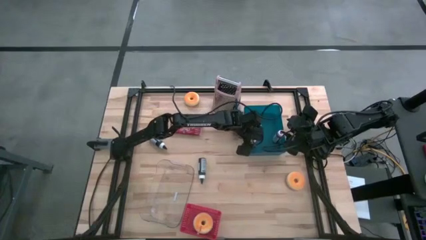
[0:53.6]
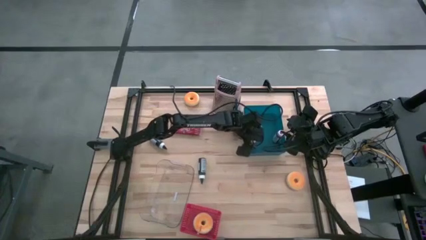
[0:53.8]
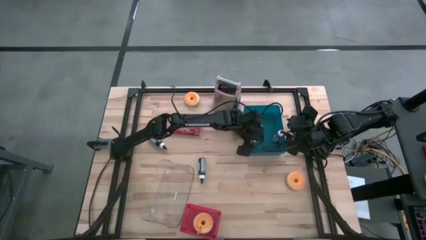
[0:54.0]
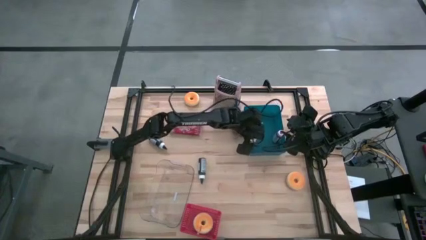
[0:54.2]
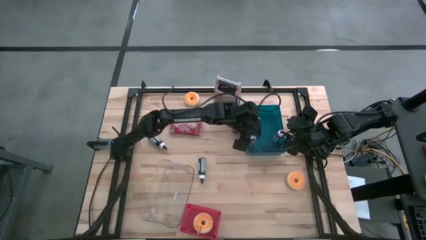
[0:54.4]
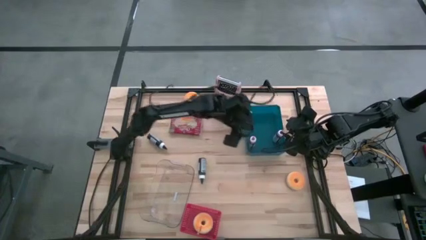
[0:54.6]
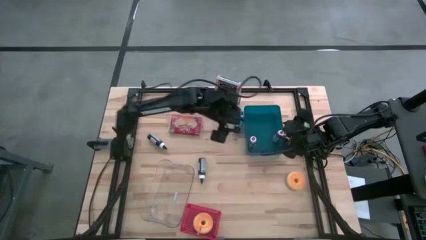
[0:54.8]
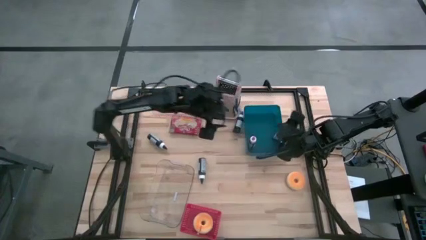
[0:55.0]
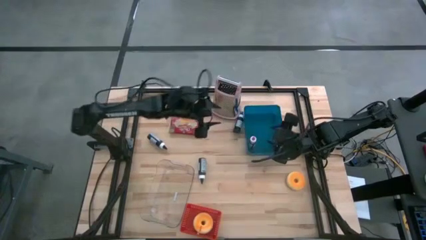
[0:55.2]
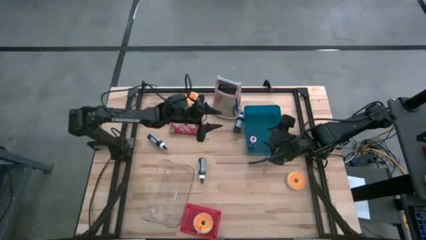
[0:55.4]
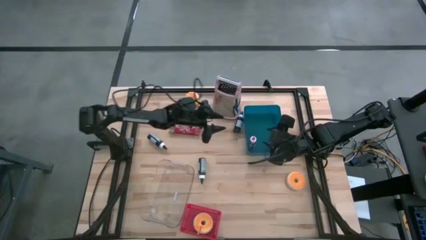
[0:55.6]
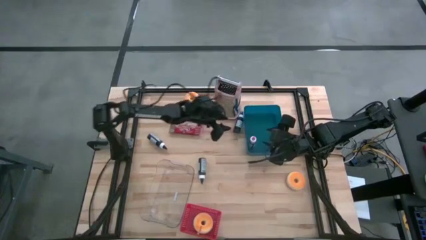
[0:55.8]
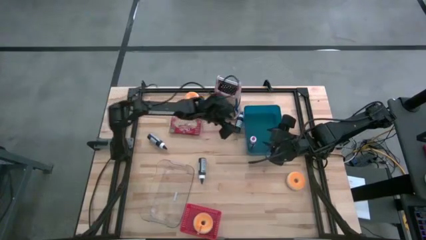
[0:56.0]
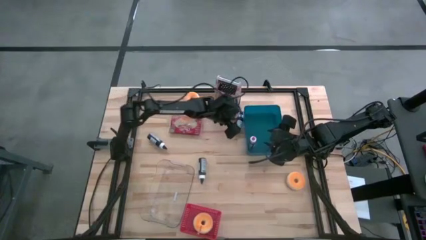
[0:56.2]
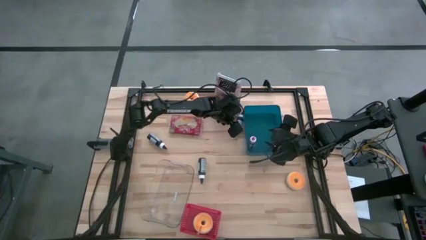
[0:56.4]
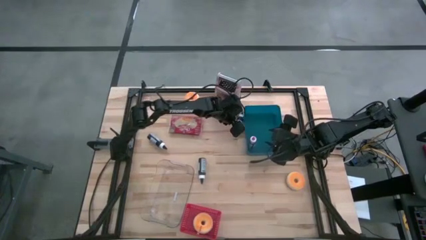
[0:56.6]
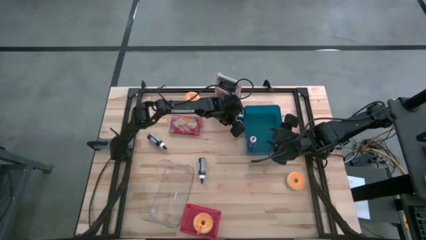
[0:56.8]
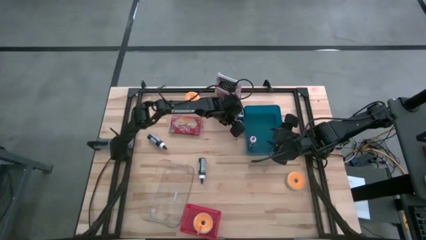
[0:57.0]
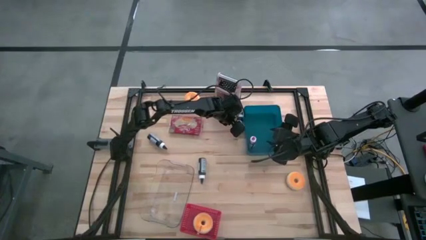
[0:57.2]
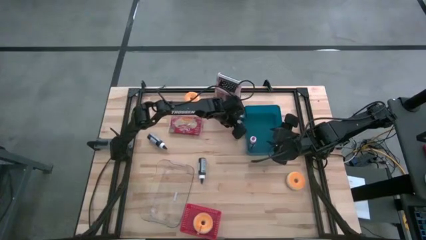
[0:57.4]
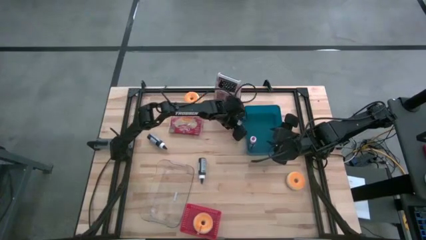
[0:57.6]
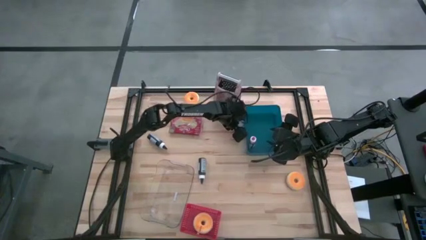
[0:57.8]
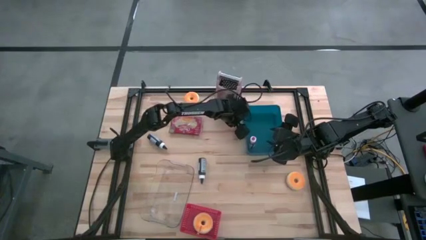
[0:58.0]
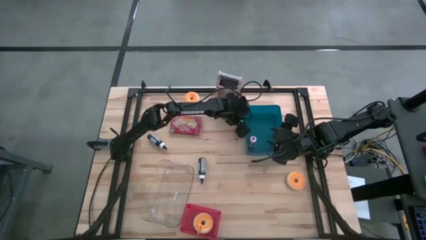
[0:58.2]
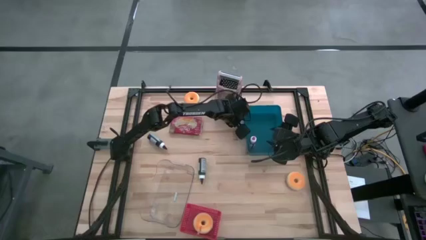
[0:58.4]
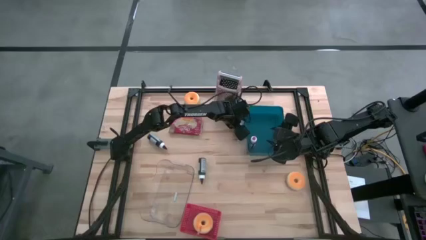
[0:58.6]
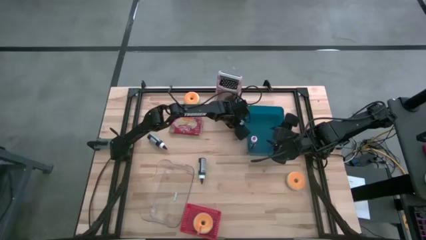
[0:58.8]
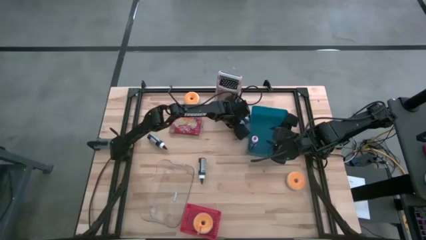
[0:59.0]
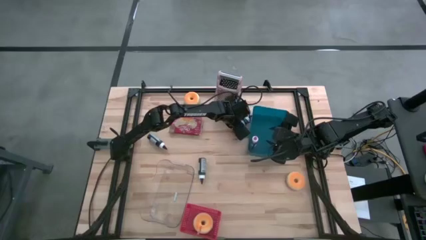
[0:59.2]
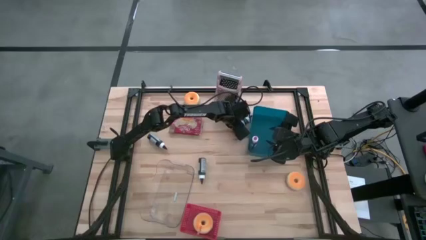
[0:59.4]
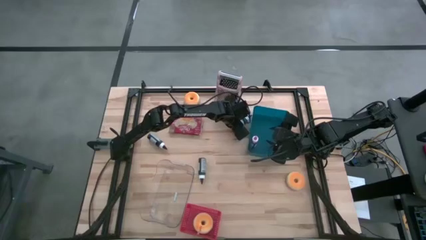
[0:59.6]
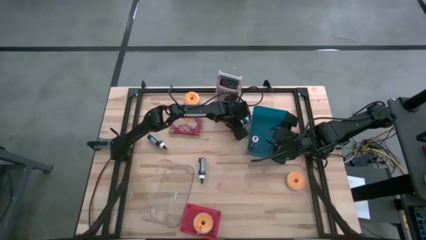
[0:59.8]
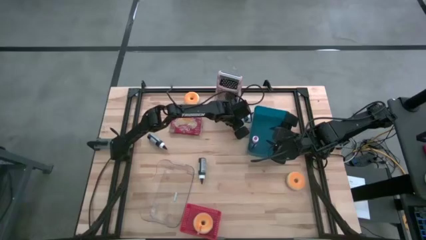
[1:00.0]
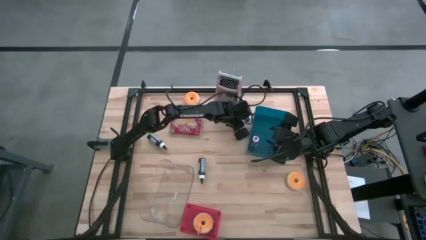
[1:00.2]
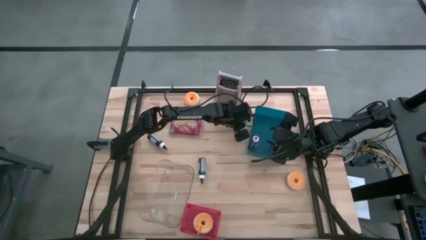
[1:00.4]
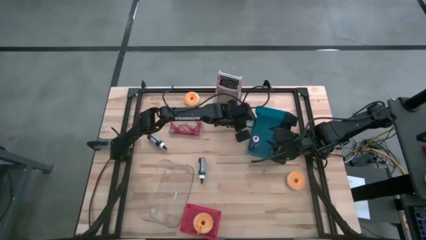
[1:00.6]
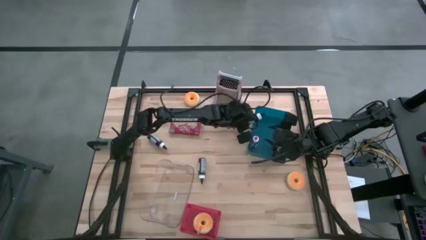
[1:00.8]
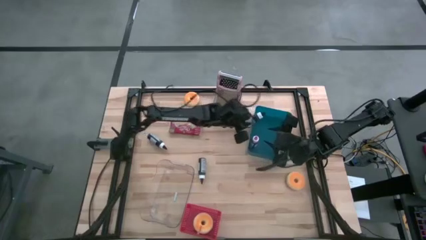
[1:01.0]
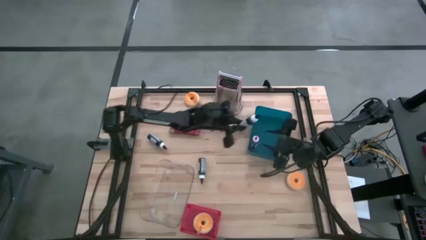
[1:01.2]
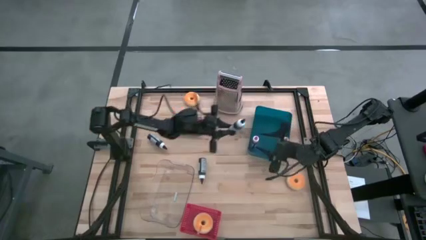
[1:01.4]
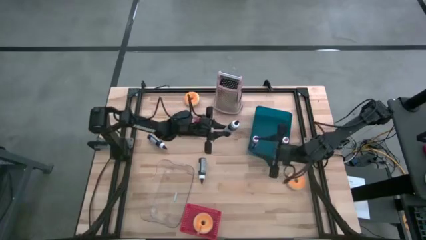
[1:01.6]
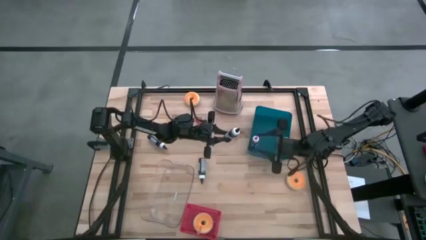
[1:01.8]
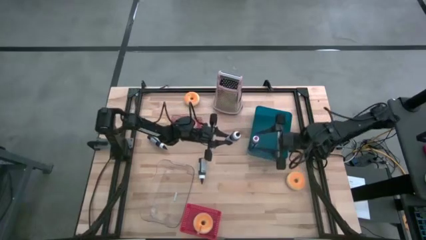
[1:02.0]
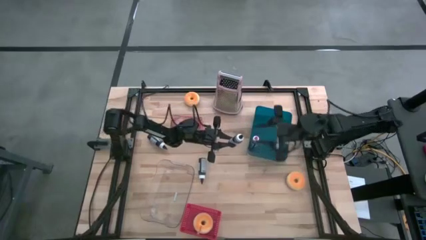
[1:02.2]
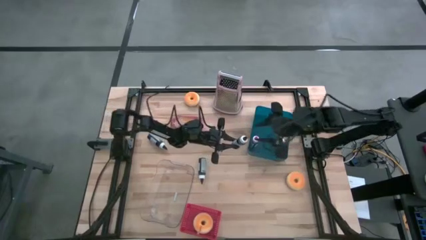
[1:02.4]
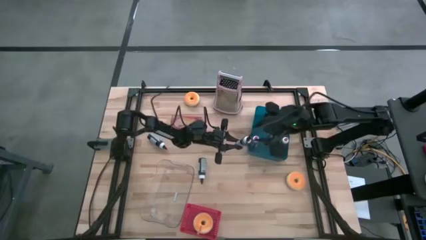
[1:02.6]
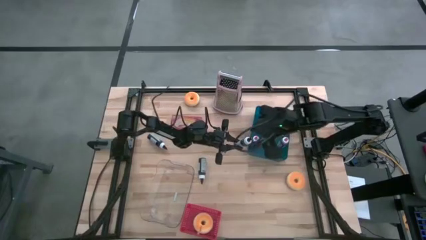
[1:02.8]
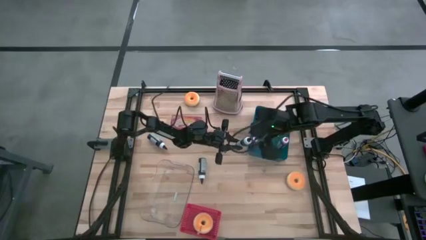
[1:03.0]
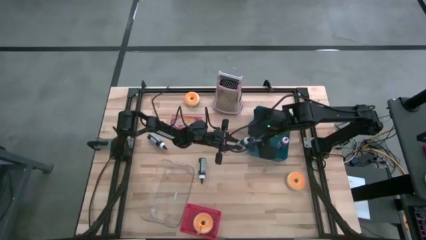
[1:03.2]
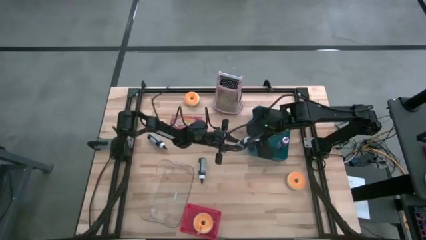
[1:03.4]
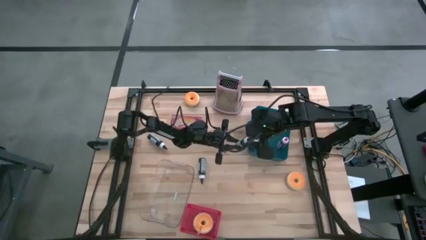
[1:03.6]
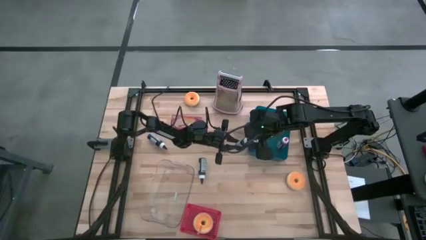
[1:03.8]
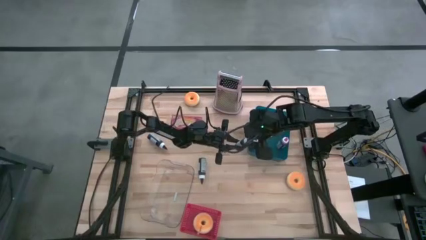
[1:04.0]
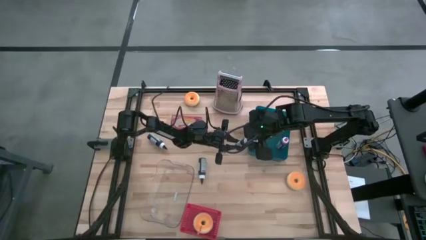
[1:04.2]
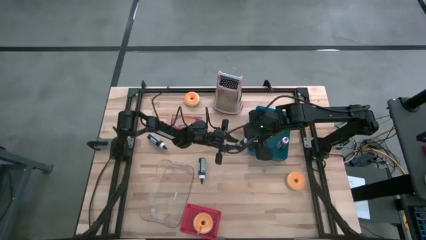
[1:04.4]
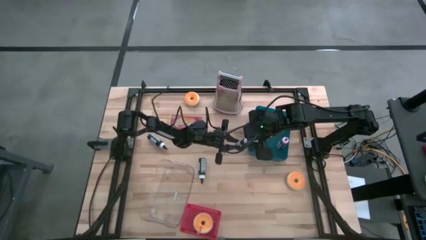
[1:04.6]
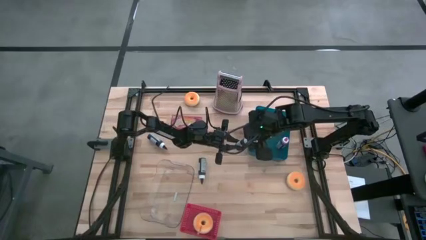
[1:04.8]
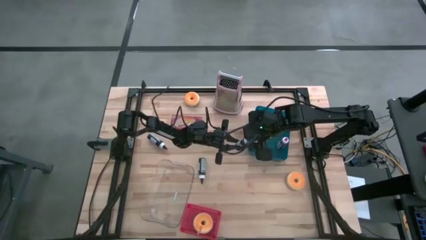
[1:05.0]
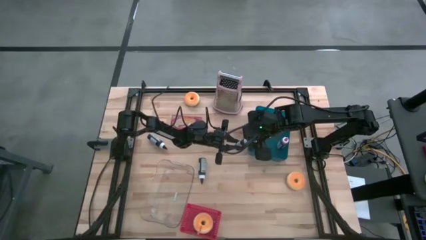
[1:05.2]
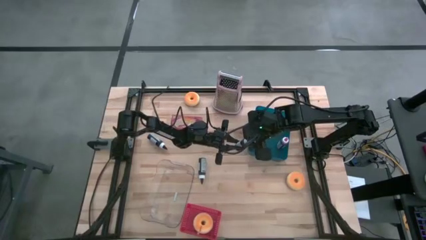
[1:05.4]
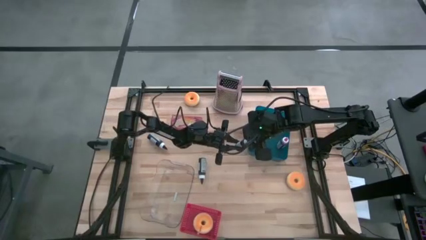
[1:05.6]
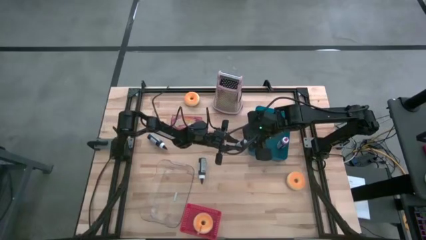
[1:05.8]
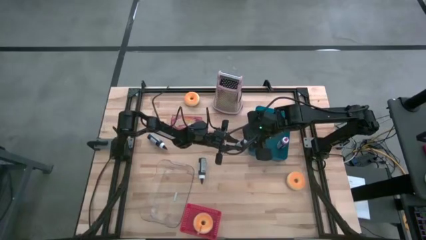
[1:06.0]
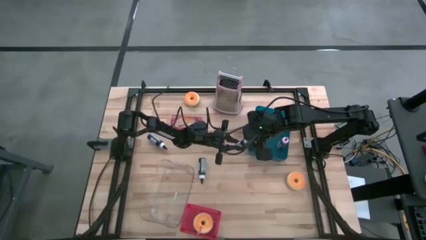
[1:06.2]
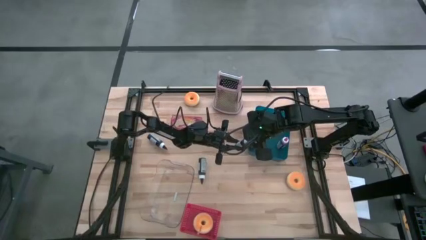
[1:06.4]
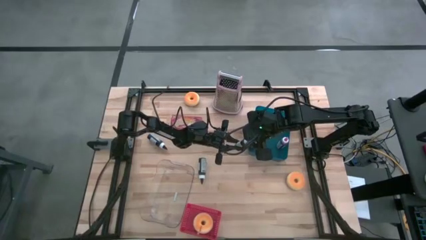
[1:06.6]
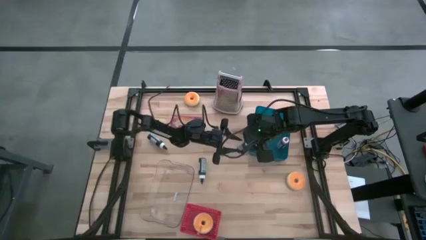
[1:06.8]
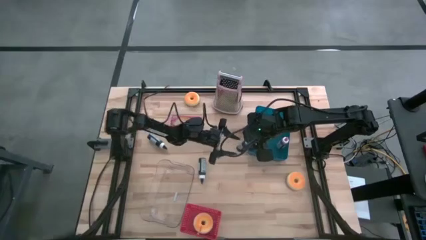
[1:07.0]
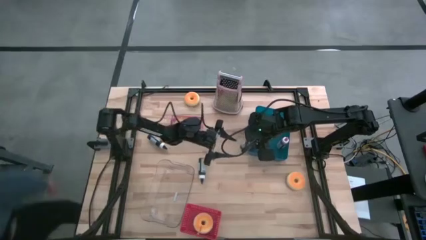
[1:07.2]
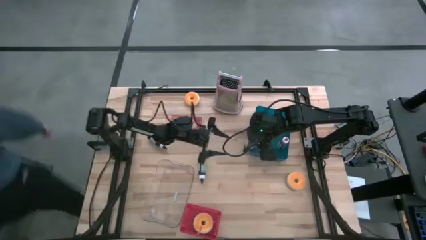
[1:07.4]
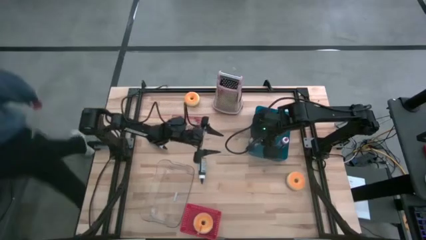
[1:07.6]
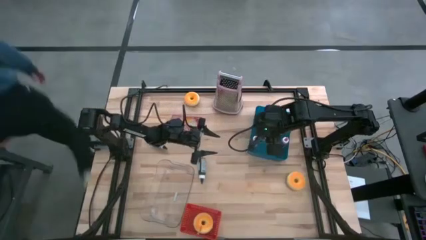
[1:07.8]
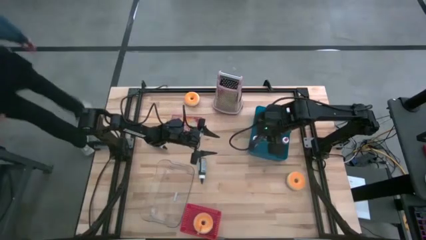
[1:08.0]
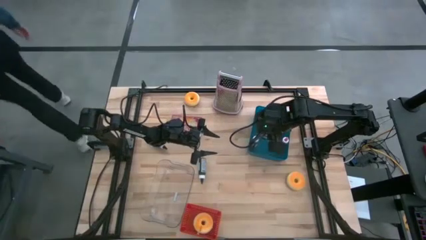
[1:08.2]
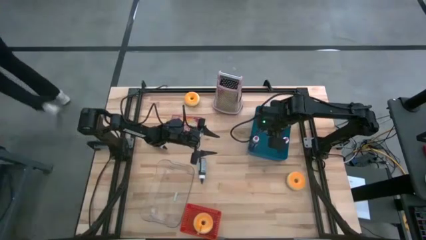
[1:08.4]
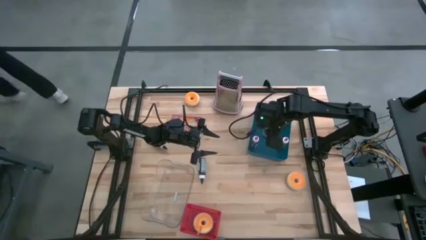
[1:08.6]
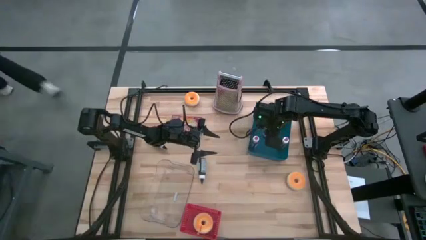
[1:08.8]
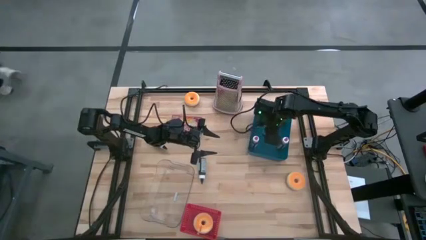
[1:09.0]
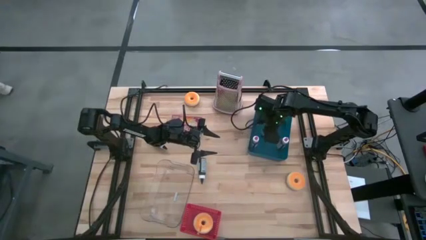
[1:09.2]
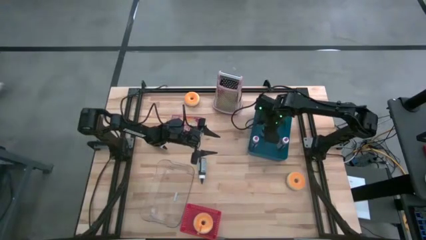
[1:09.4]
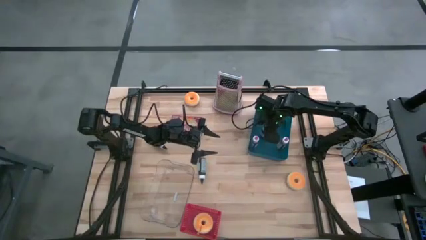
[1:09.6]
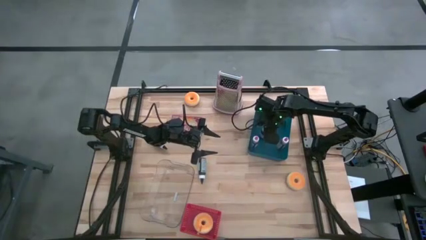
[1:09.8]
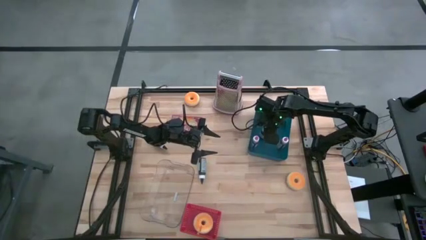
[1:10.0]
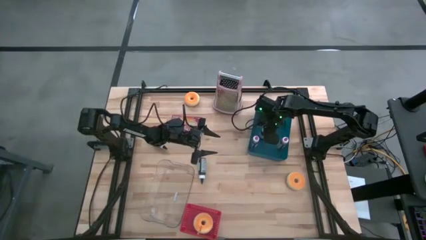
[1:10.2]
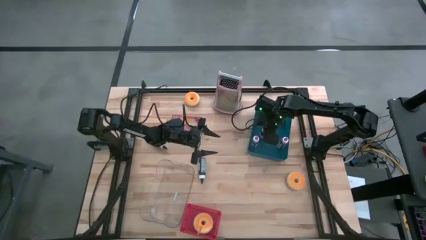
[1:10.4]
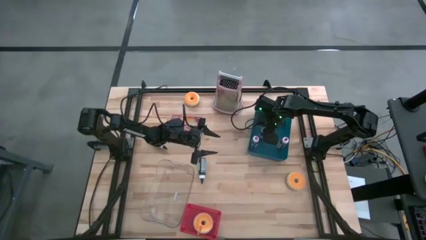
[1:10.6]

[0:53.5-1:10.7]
Task: Pick & Place Food Item
Put the top black food coloring bottle into the blue bin
